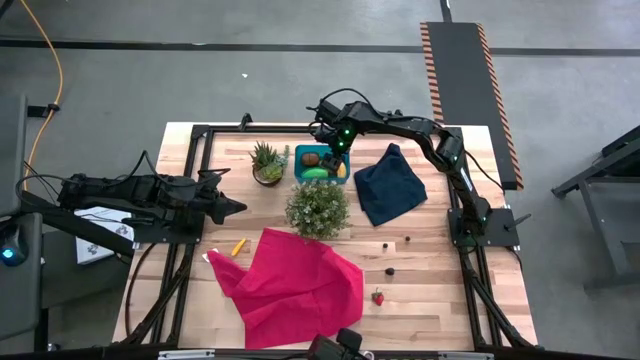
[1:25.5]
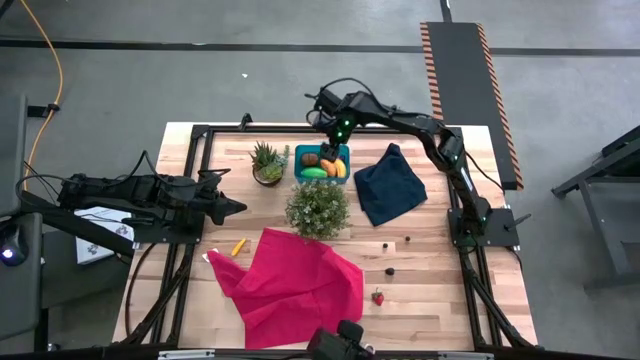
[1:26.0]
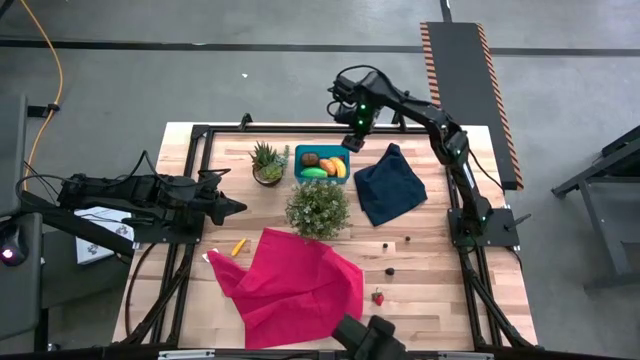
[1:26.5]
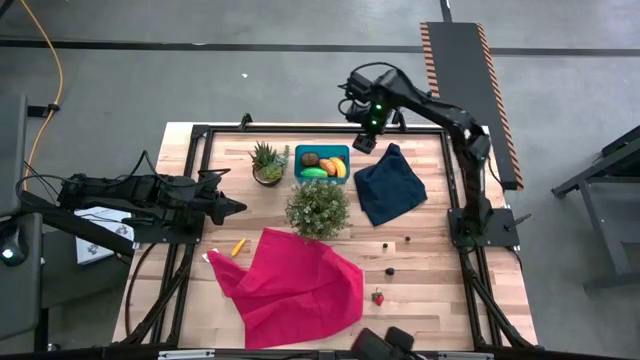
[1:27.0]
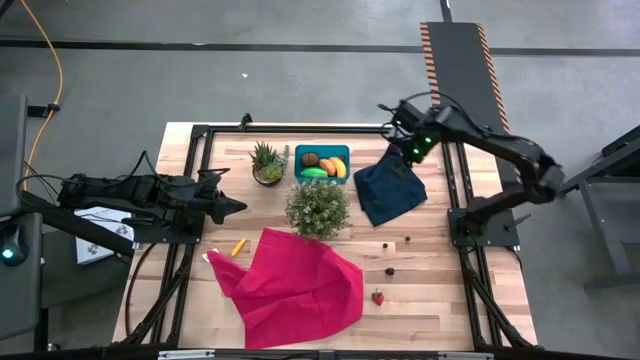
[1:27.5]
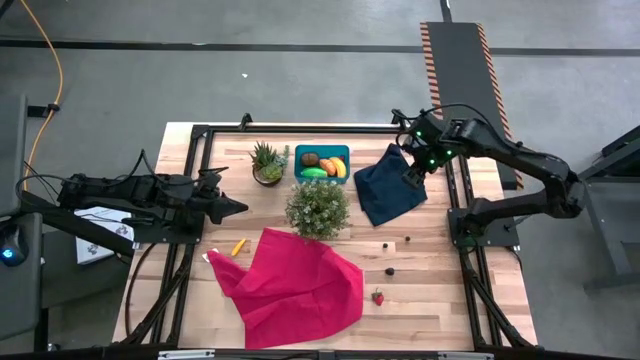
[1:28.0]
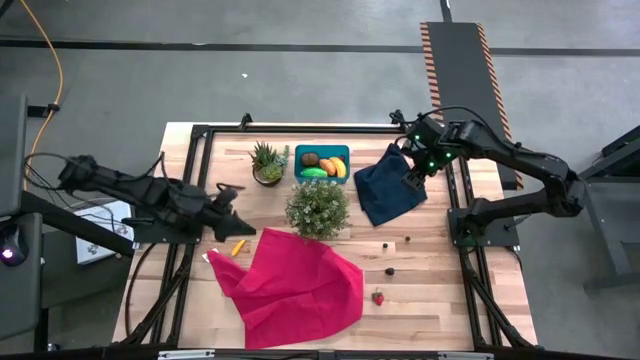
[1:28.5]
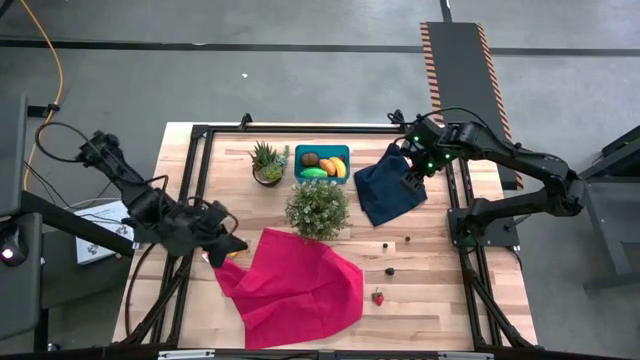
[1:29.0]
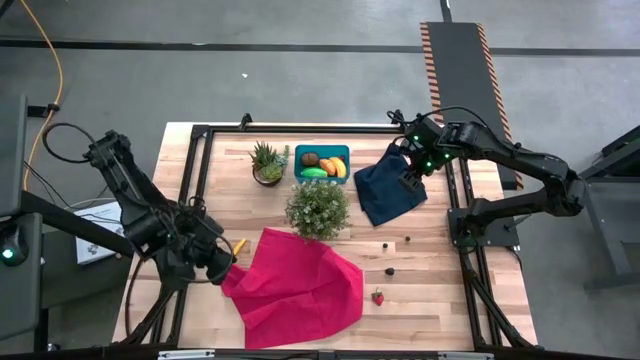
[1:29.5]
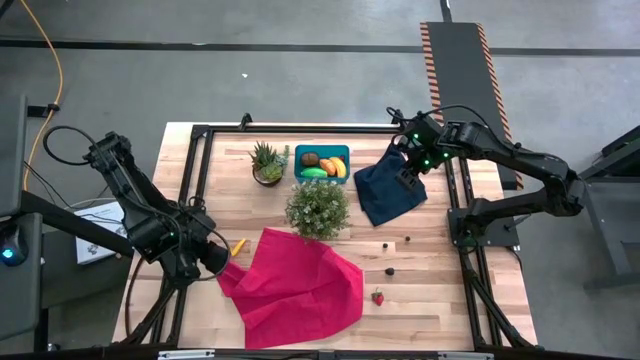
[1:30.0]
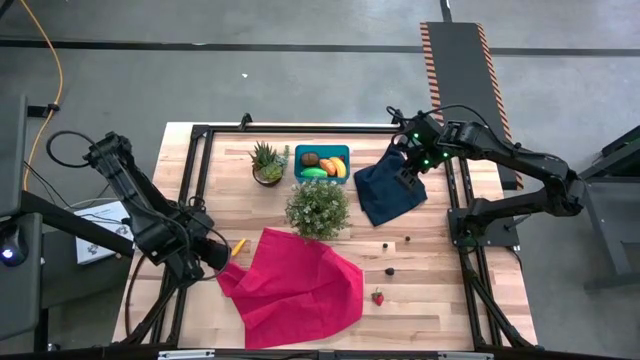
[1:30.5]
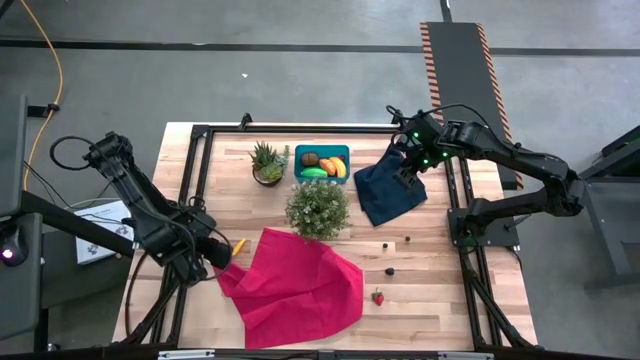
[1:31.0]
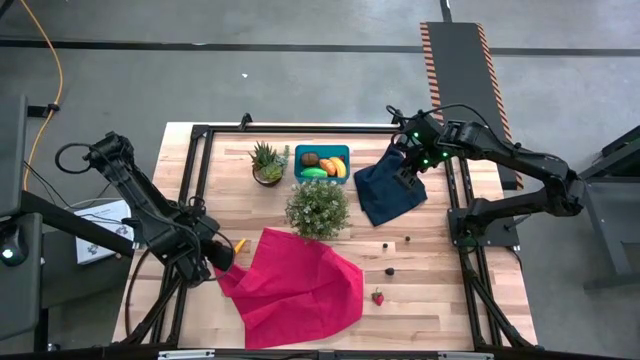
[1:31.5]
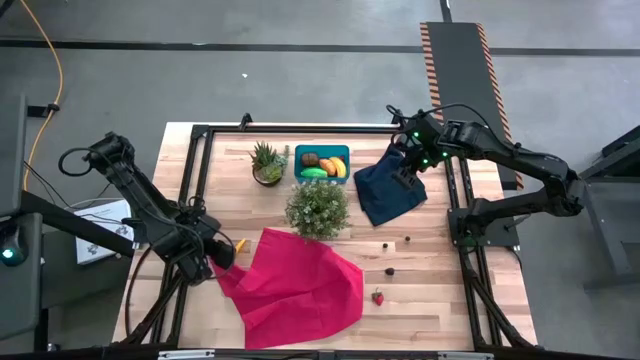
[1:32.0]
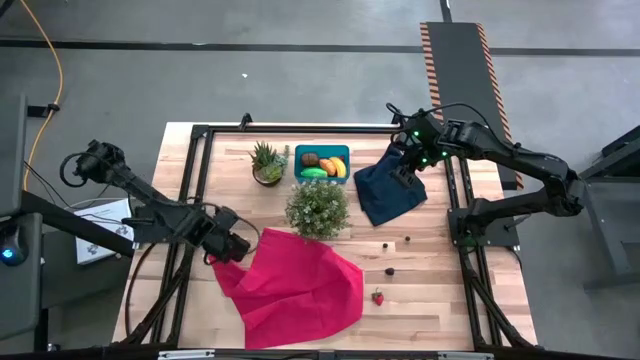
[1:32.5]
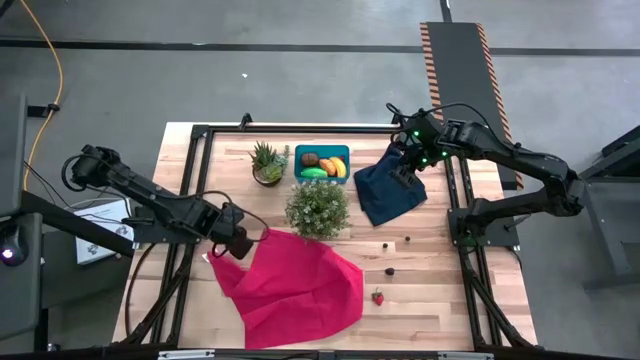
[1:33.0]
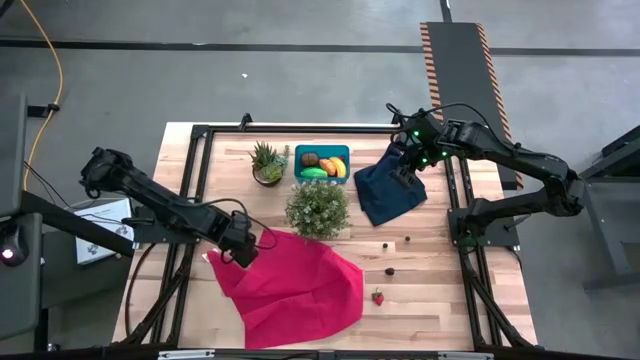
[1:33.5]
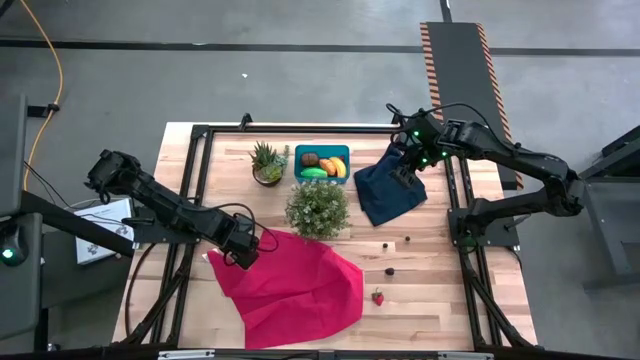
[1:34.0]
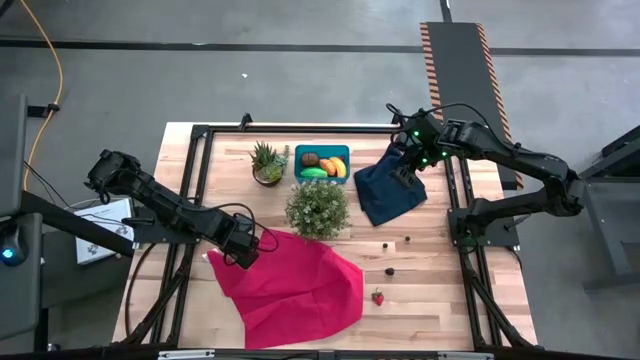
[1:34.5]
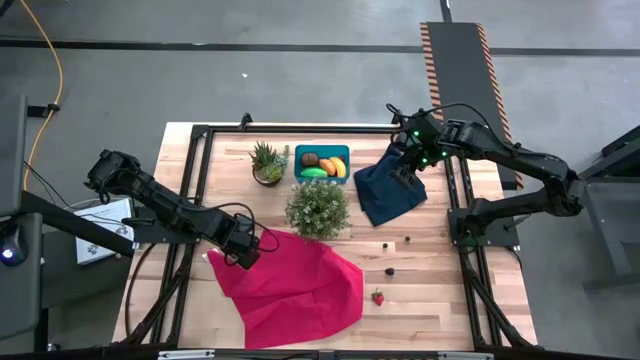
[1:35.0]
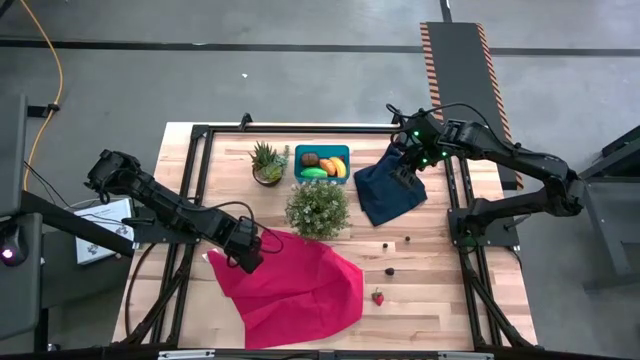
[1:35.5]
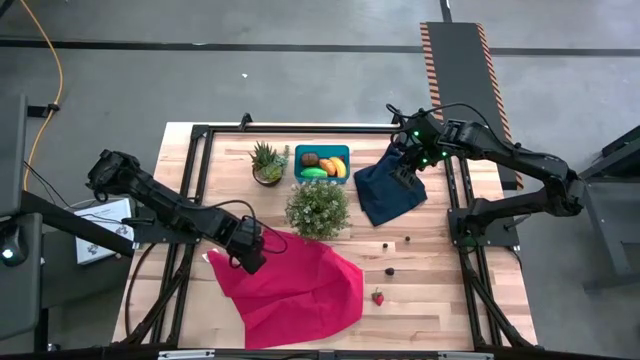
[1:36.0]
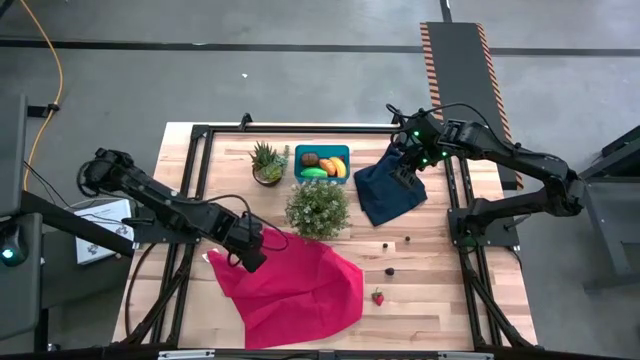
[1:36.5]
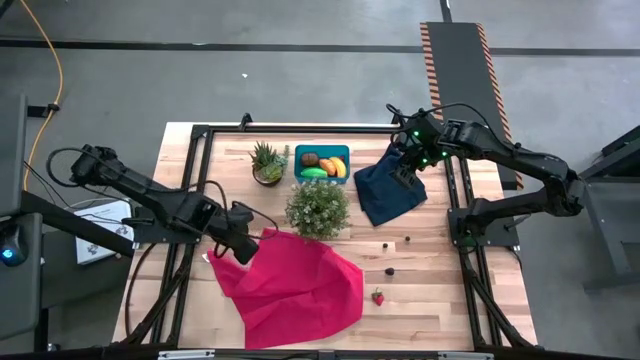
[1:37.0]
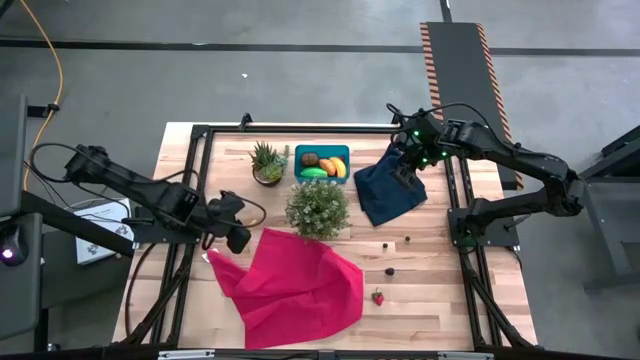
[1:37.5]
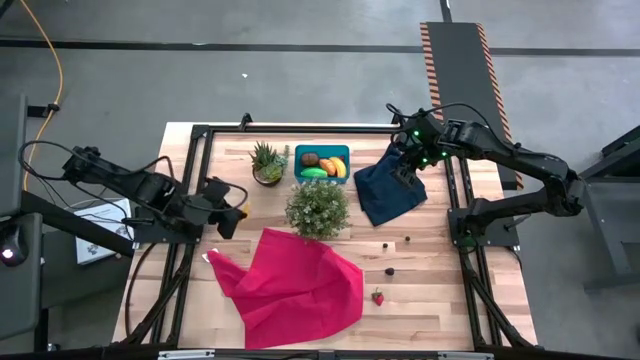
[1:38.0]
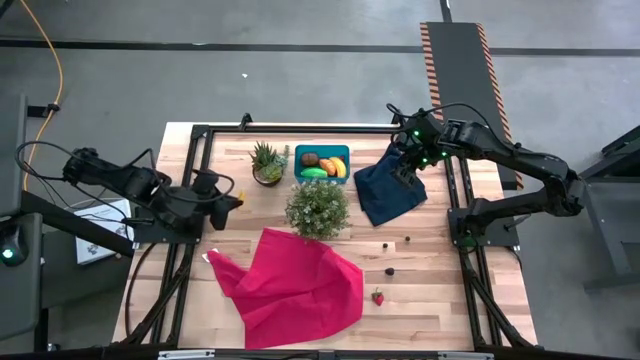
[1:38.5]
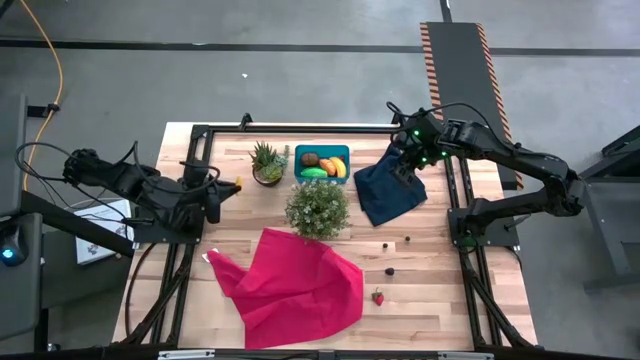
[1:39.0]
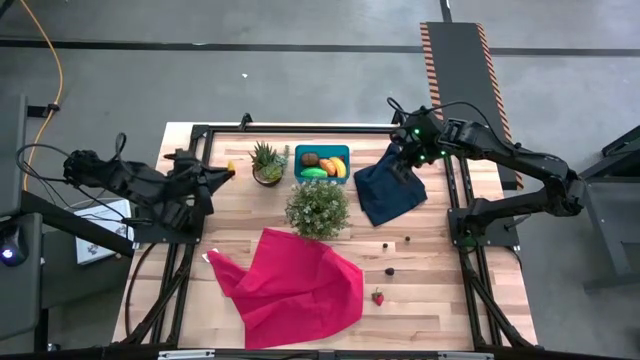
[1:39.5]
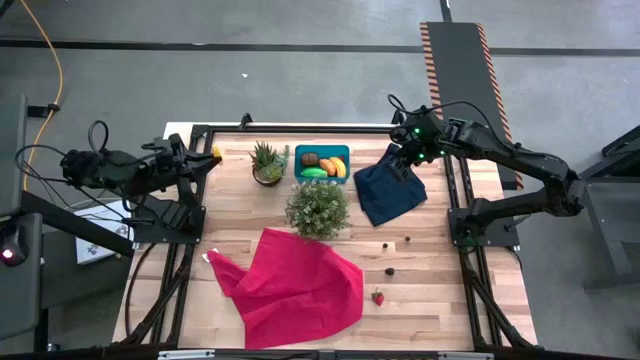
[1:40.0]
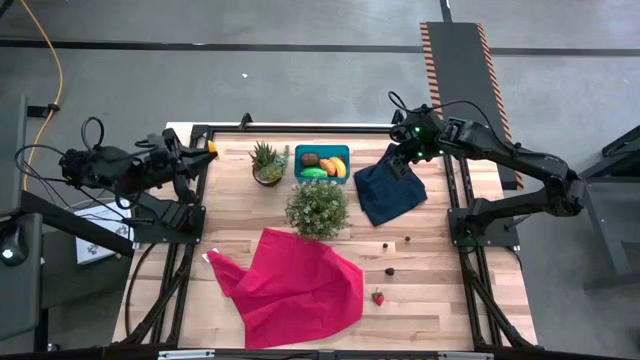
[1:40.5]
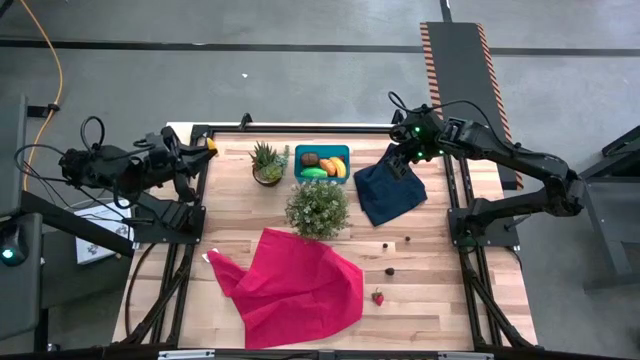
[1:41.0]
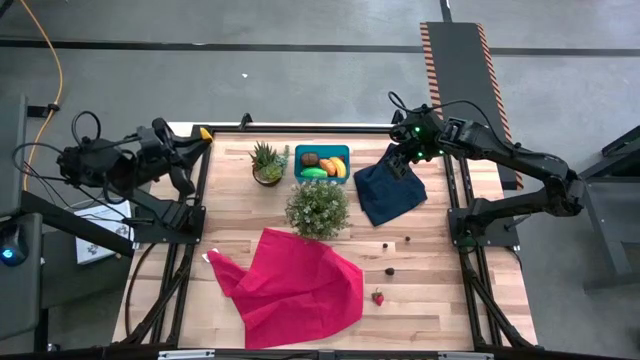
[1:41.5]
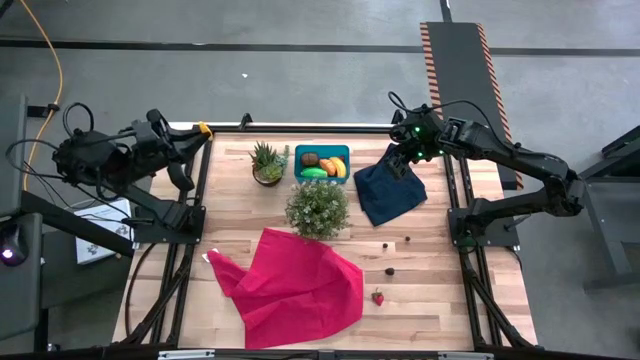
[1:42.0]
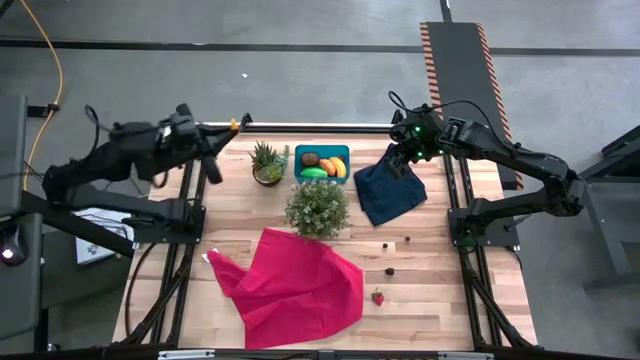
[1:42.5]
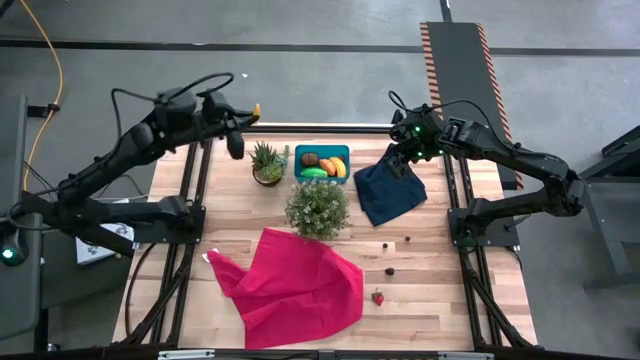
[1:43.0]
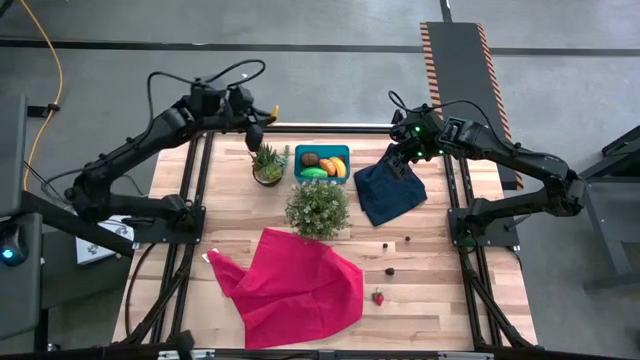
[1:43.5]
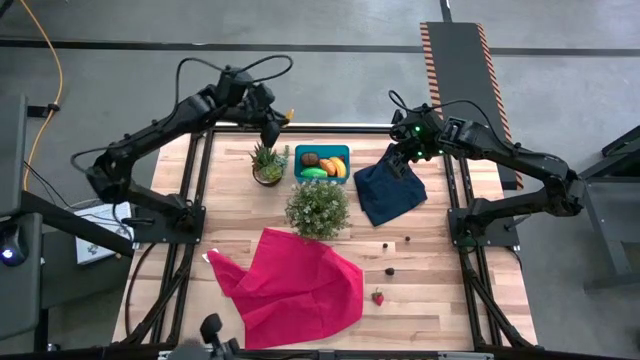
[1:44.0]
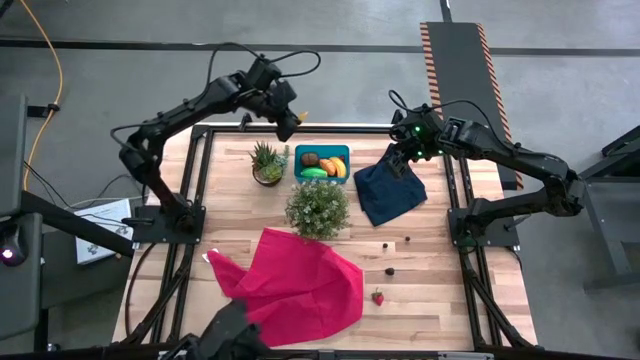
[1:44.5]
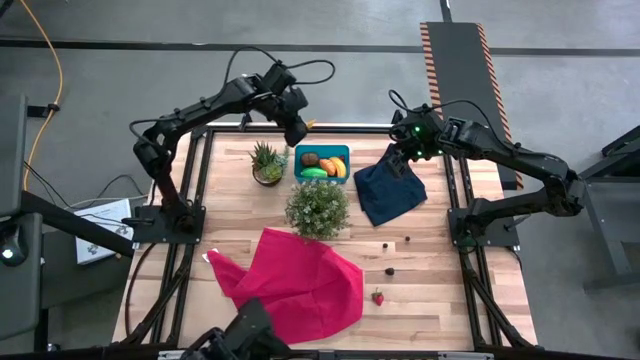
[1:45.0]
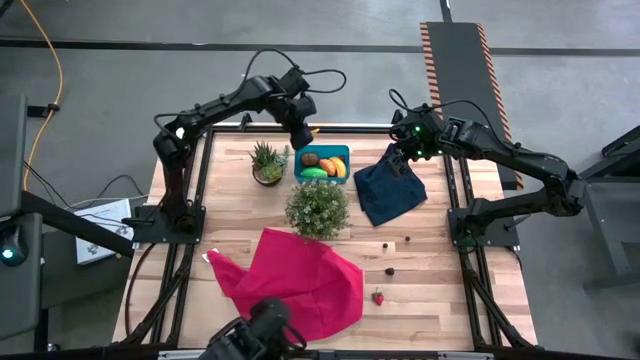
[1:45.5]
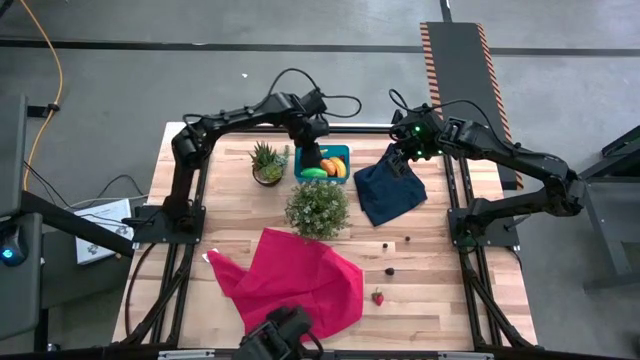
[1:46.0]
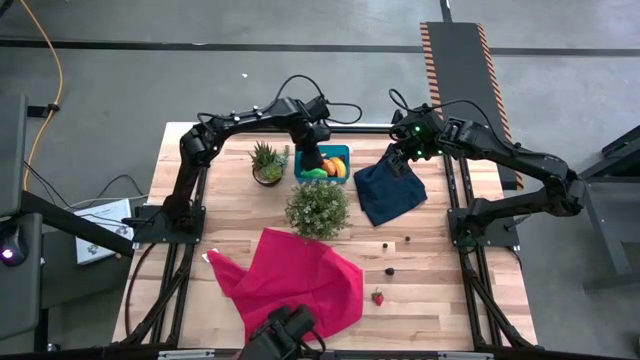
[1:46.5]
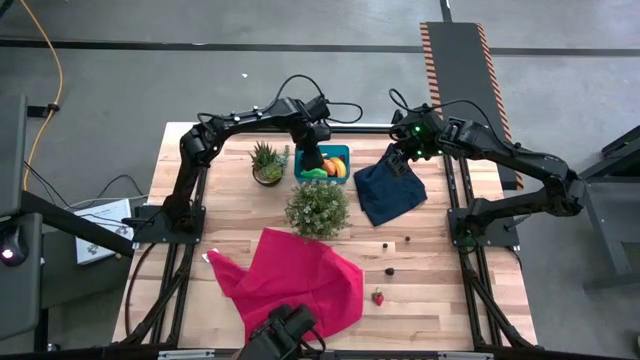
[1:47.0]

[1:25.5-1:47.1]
Task: Pick and placing Produce into tupperware
Put the yellow corn into the blue bin
